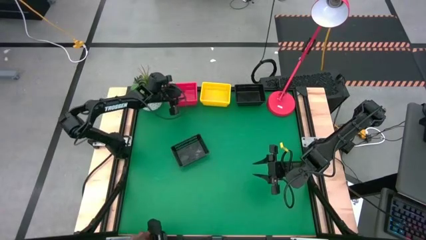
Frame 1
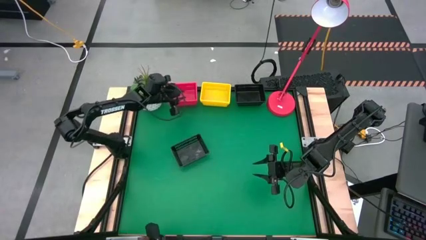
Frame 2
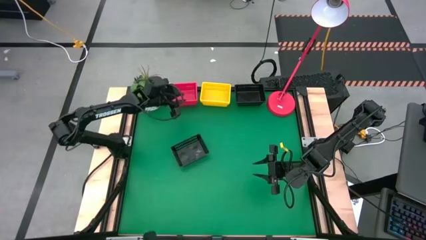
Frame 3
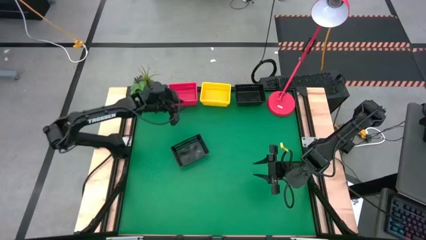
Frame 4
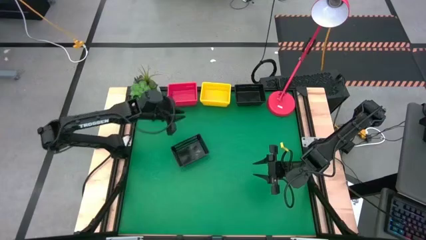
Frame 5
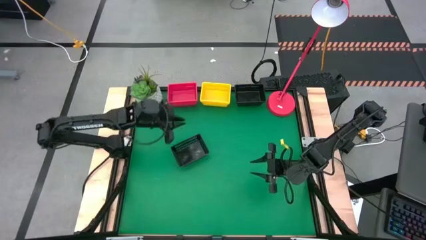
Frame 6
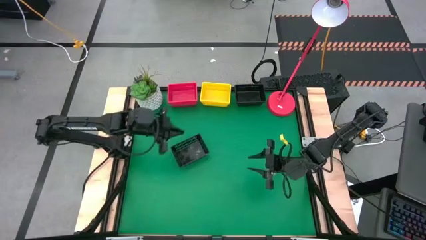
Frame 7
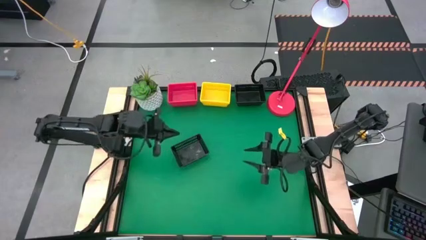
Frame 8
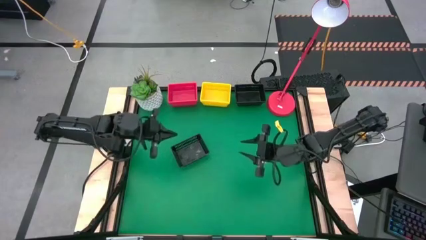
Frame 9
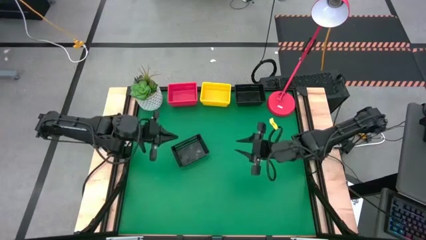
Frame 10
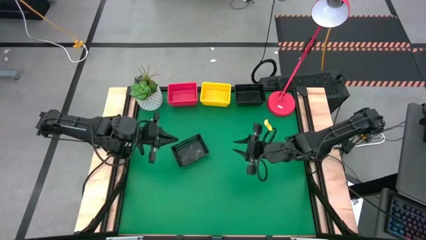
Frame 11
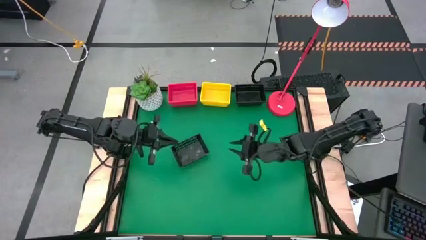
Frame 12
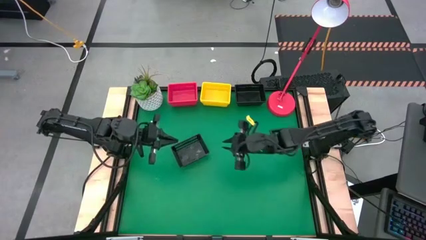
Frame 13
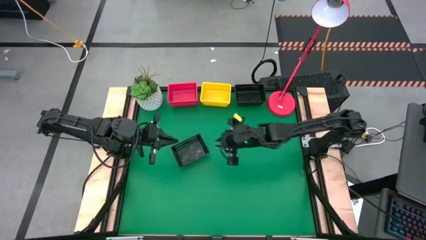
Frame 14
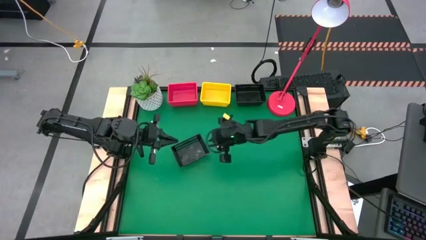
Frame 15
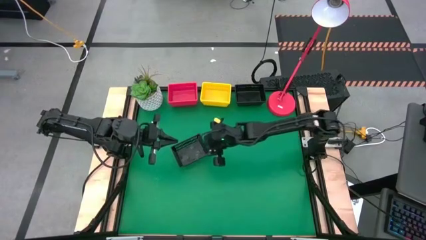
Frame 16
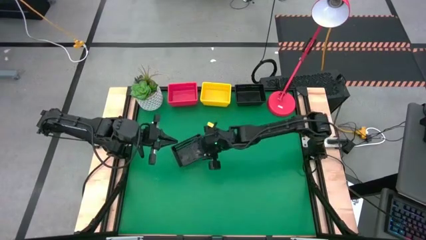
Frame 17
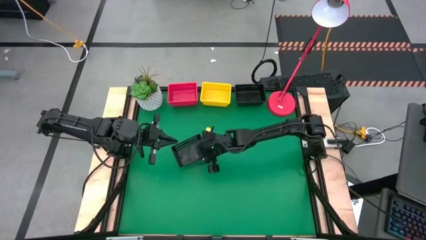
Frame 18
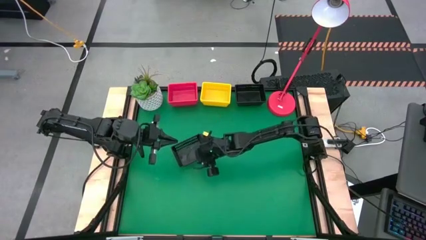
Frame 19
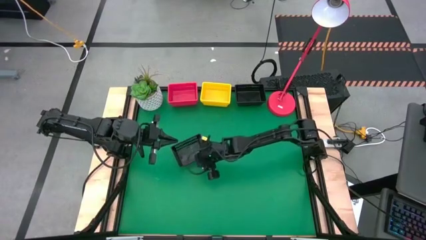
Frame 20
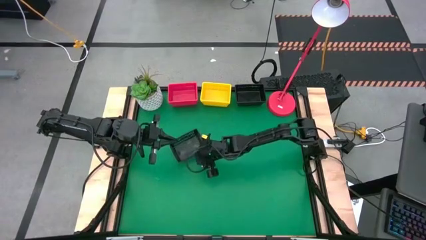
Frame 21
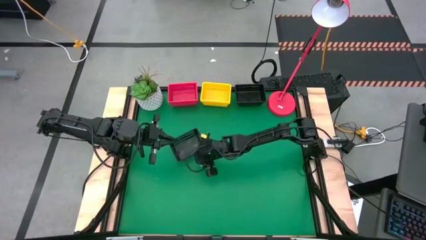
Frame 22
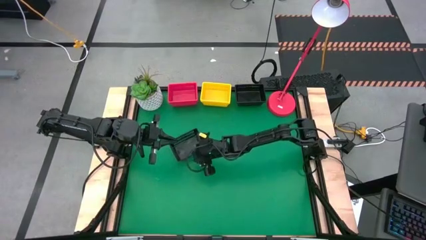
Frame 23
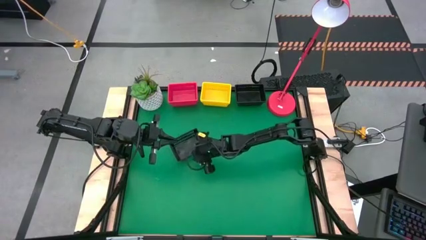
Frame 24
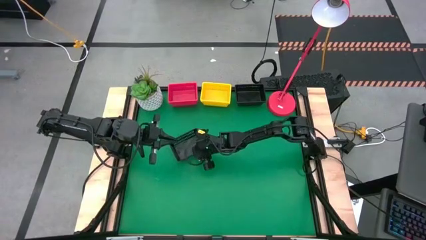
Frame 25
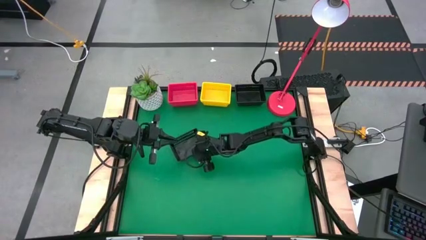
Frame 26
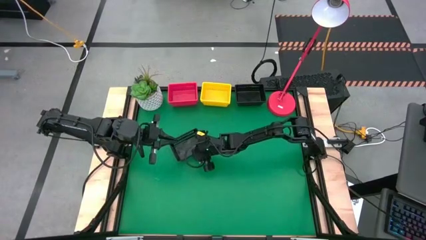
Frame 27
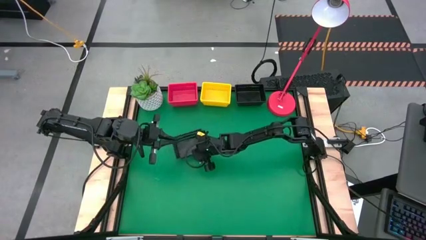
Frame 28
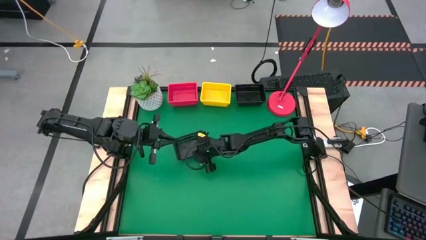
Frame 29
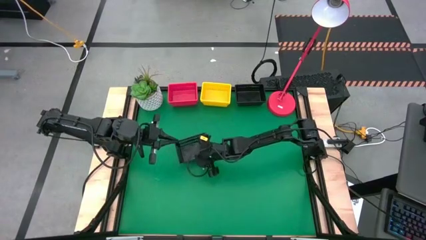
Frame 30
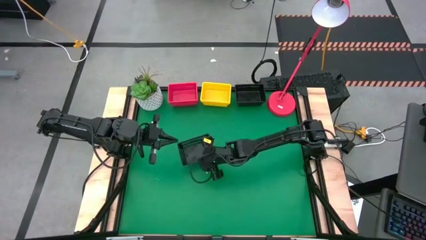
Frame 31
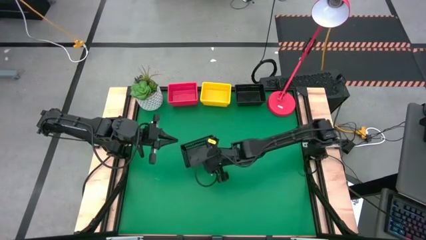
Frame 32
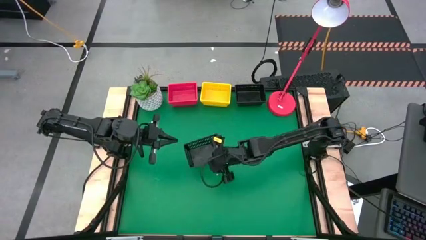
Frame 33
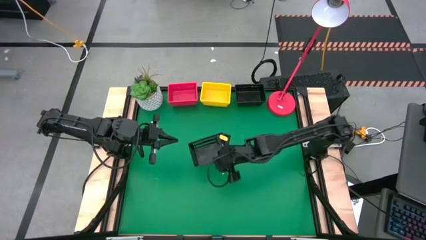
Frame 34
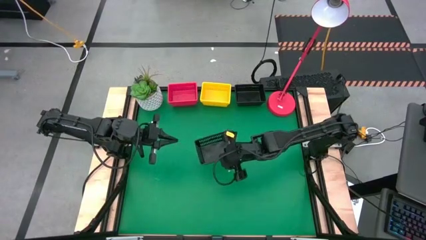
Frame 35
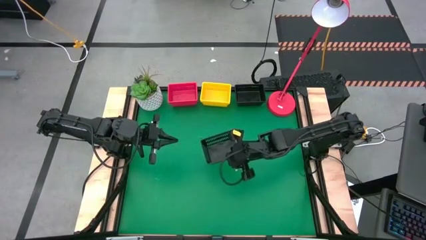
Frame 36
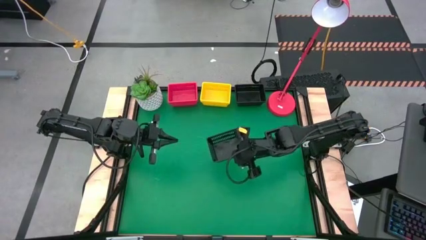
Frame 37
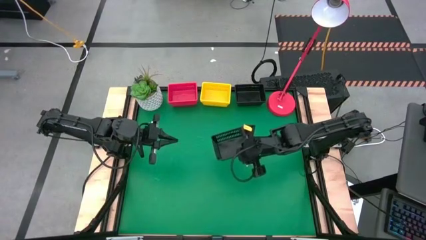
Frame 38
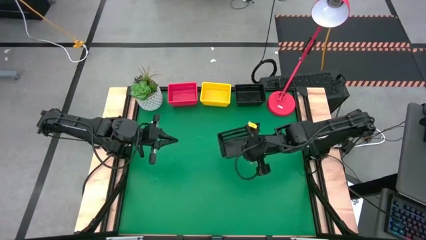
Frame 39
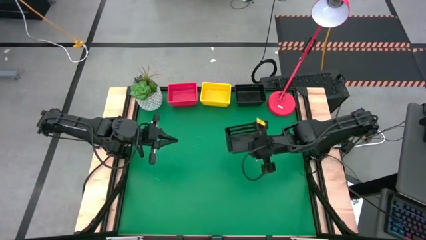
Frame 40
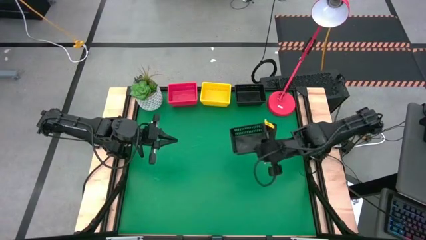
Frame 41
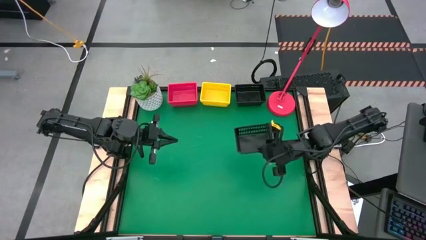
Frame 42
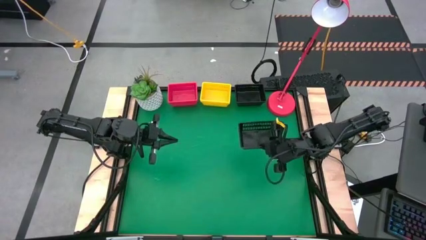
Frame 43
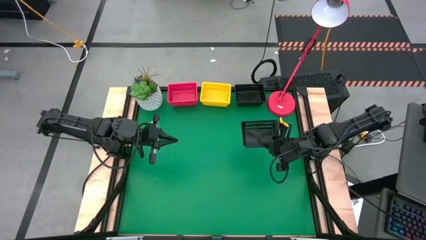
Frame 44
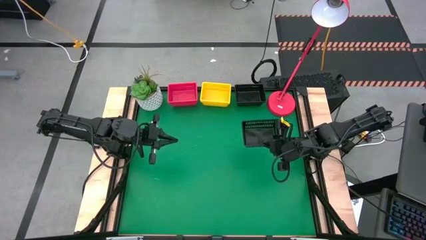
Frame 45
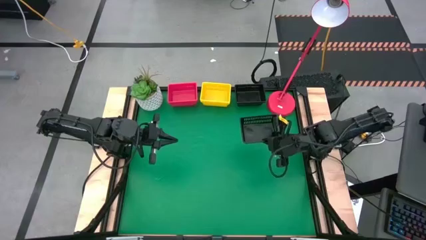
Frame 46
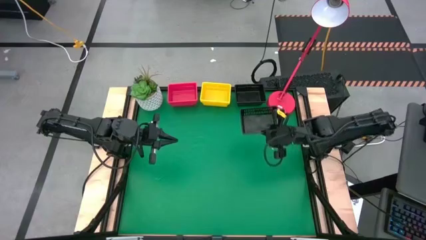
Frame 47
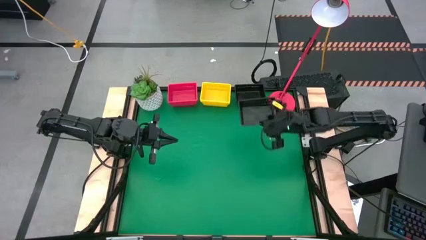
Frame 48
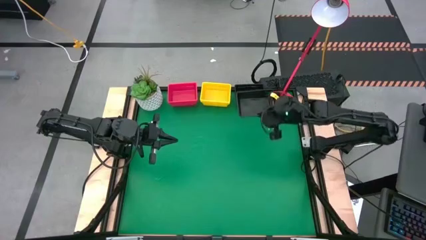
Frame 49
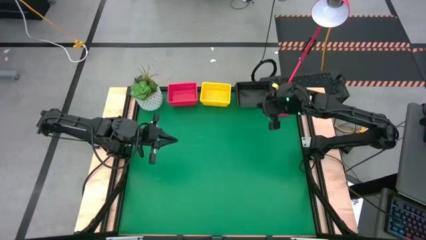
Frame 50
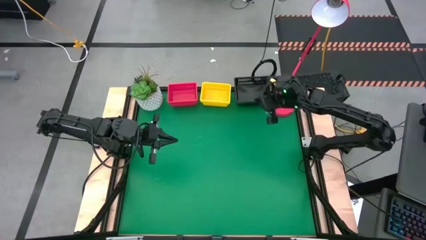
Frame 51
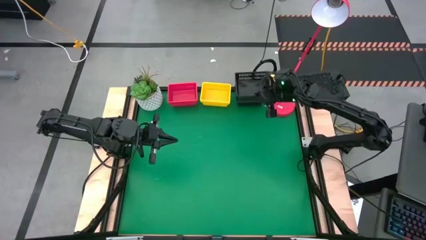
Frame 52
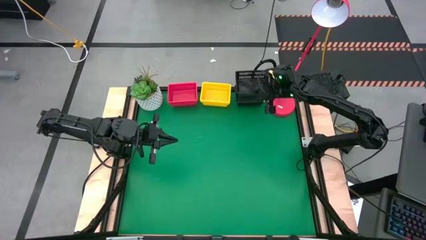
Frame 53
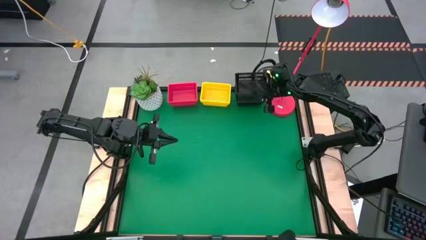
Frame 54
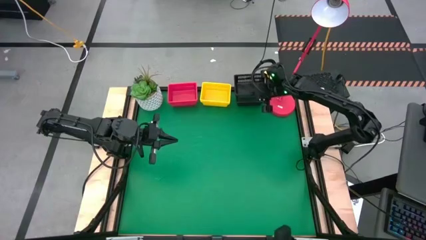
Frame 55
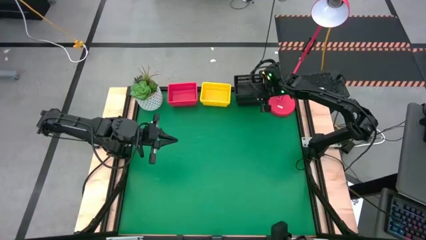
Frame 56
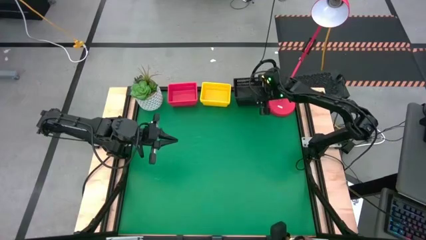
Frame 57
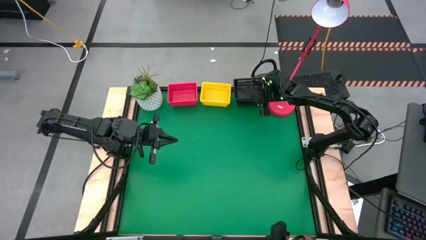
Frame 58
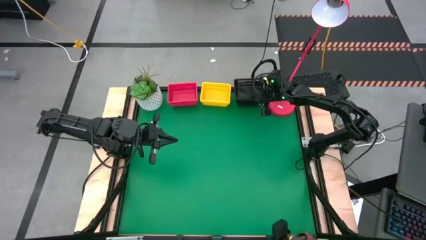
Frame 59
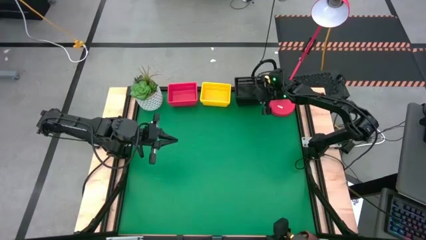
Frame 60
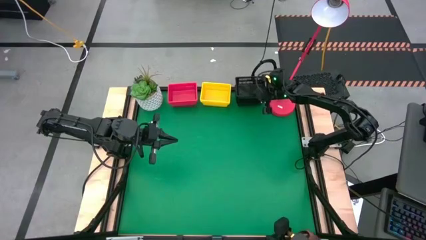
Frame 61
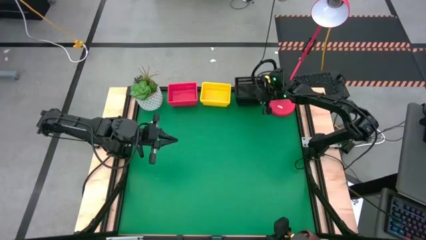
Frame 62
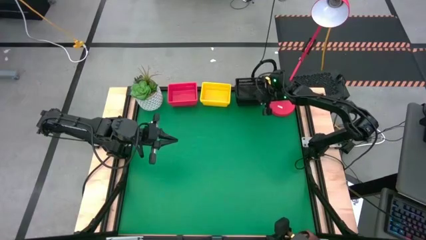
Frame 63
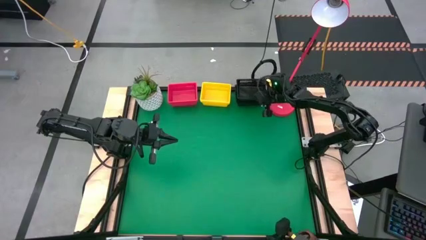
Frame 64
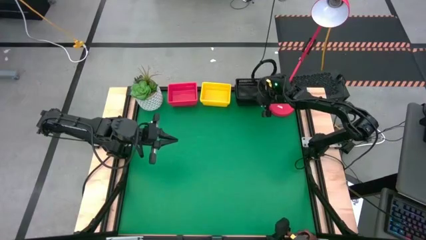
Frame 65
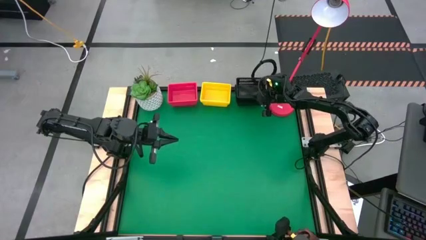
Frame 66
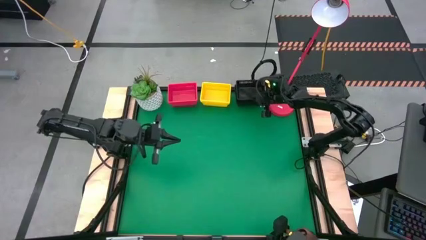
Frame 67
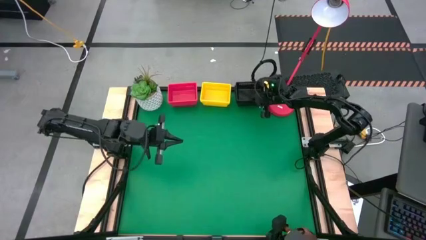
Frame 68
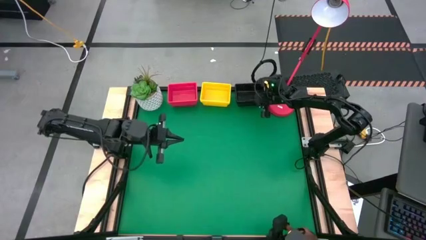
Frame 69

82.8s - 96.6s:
Stack the black basket on the stacked black baskets
